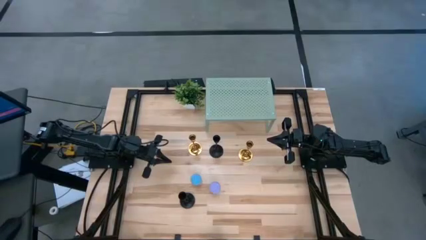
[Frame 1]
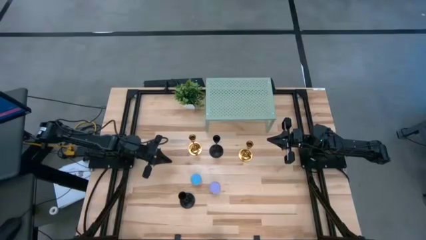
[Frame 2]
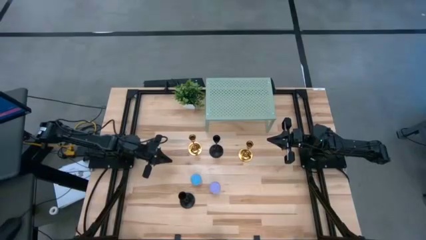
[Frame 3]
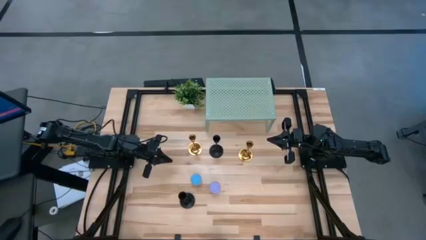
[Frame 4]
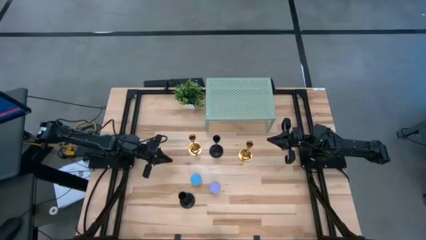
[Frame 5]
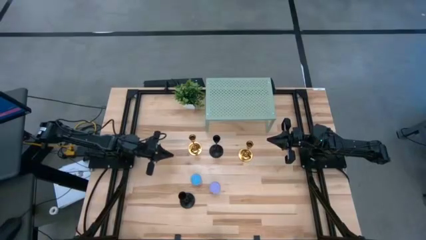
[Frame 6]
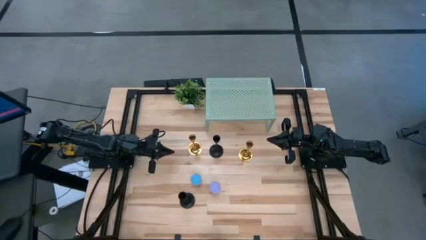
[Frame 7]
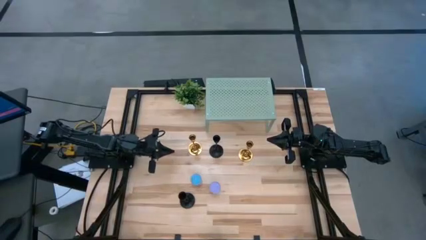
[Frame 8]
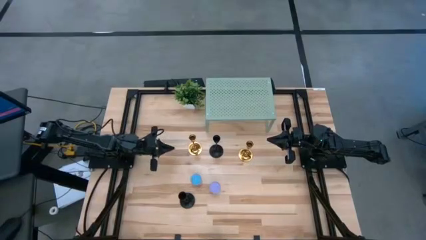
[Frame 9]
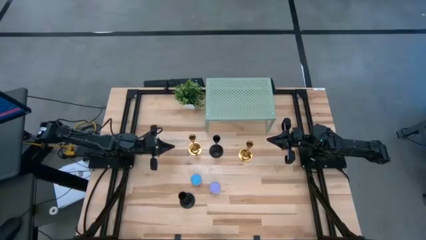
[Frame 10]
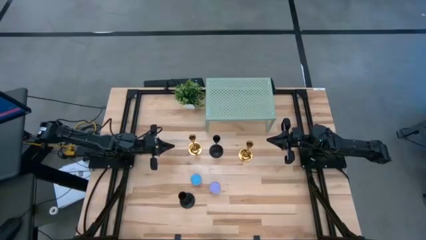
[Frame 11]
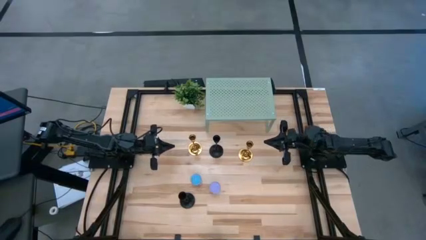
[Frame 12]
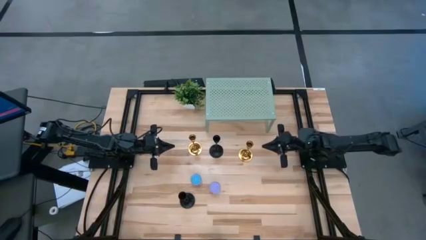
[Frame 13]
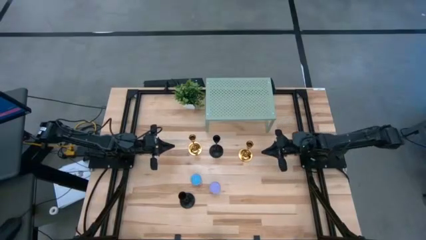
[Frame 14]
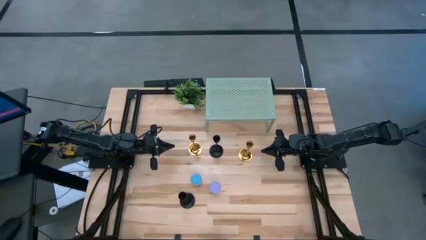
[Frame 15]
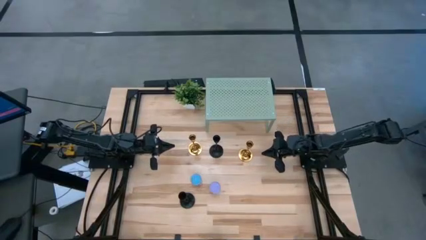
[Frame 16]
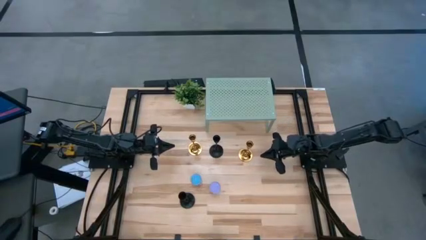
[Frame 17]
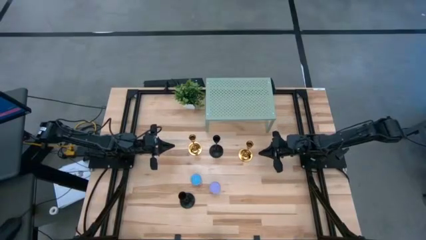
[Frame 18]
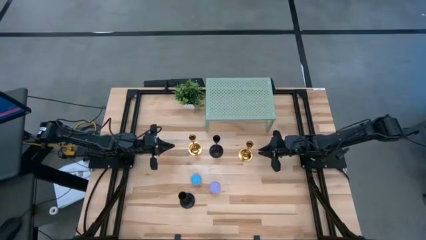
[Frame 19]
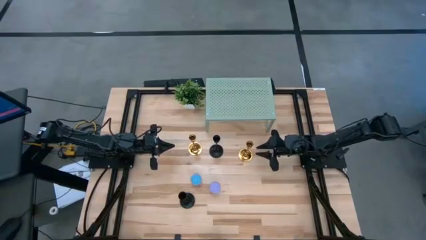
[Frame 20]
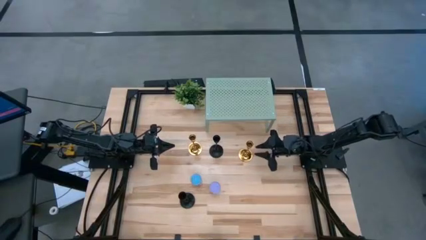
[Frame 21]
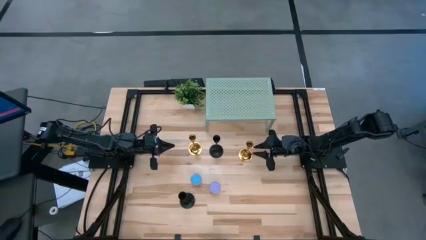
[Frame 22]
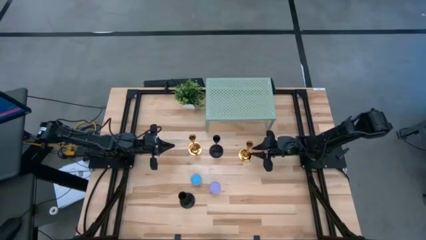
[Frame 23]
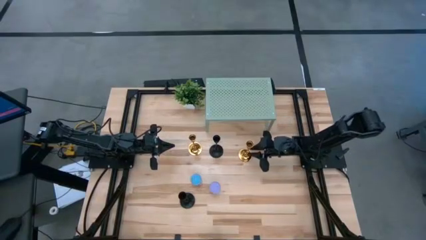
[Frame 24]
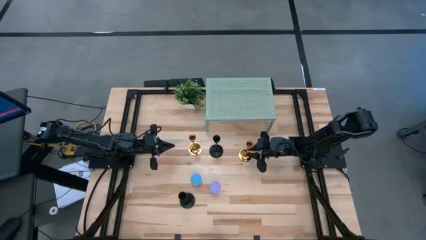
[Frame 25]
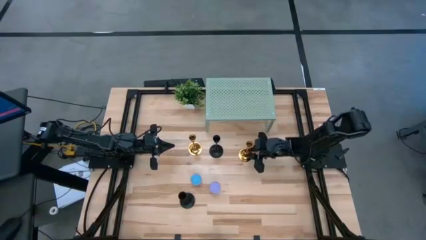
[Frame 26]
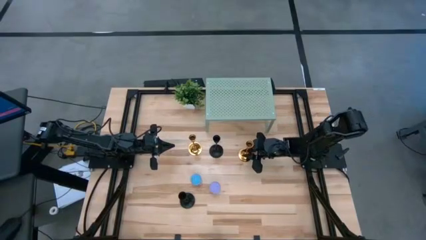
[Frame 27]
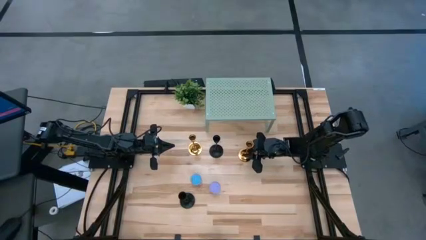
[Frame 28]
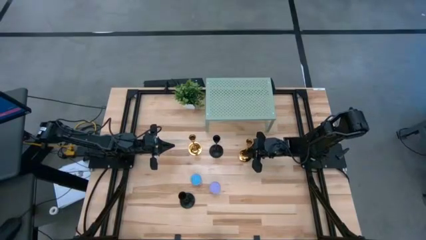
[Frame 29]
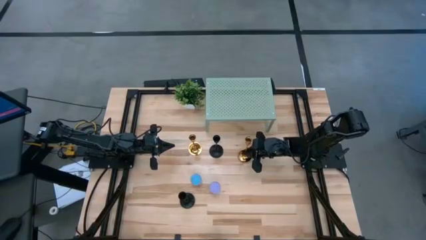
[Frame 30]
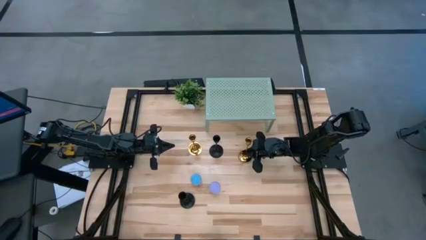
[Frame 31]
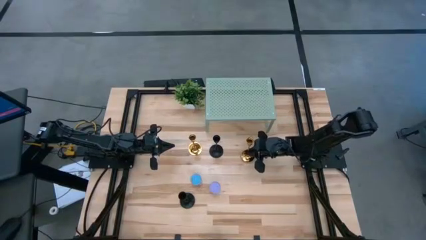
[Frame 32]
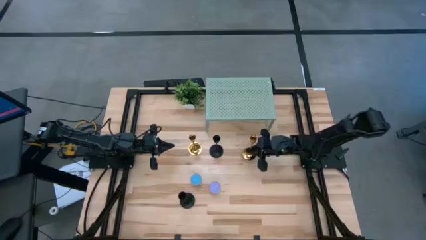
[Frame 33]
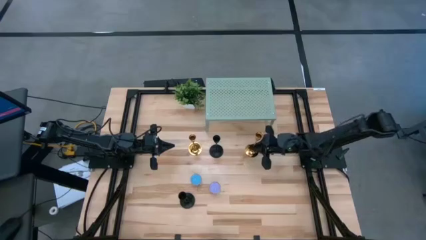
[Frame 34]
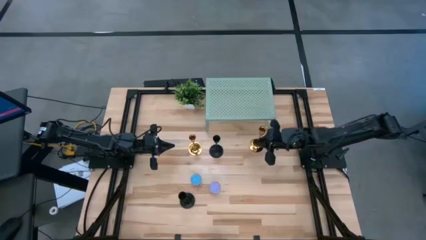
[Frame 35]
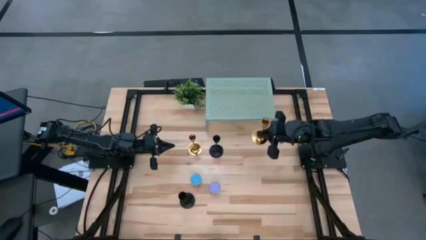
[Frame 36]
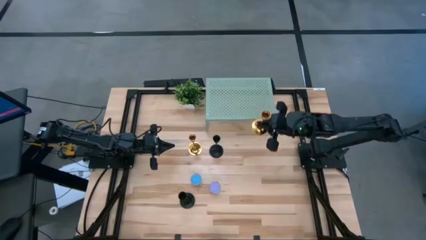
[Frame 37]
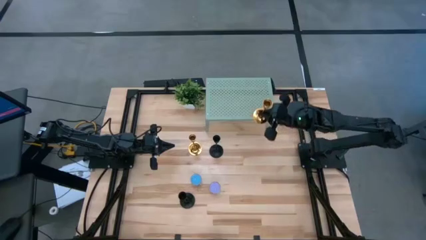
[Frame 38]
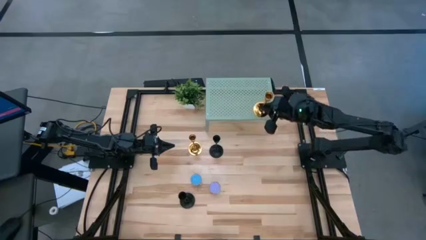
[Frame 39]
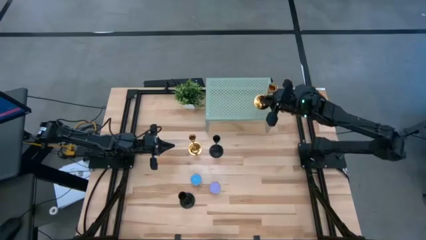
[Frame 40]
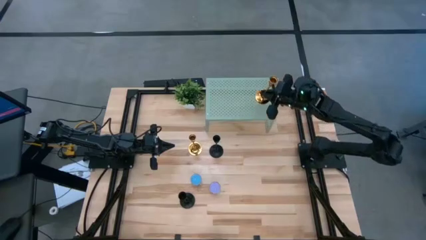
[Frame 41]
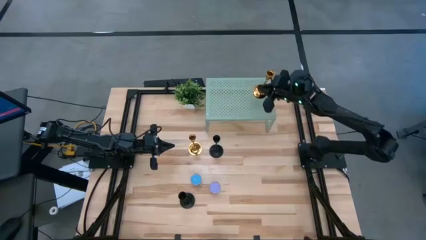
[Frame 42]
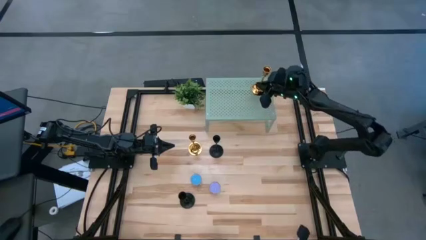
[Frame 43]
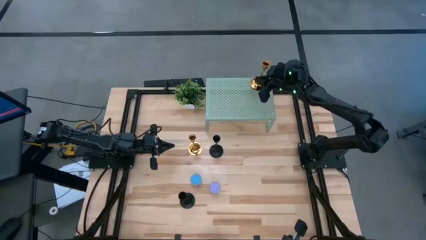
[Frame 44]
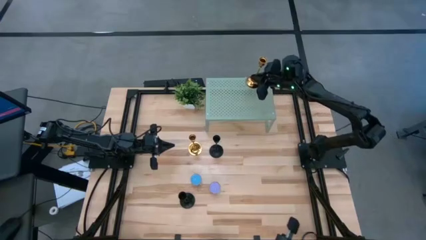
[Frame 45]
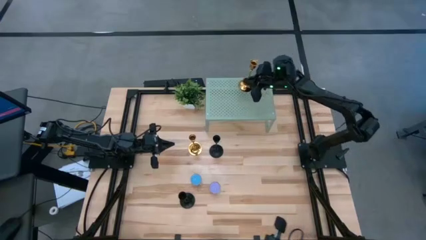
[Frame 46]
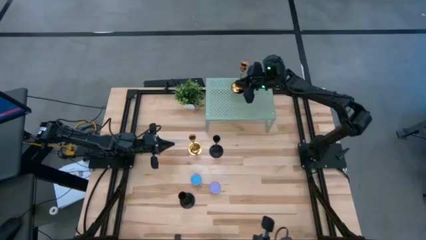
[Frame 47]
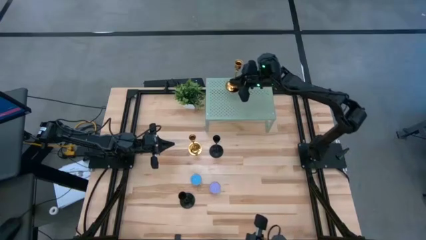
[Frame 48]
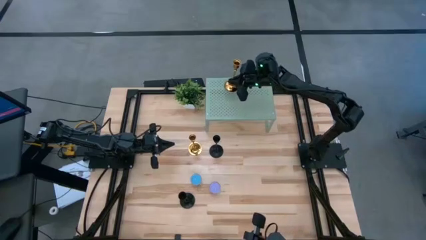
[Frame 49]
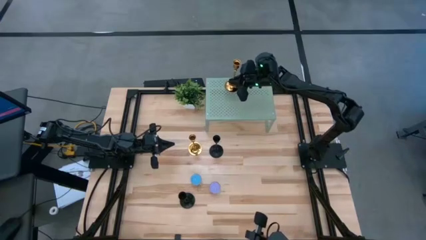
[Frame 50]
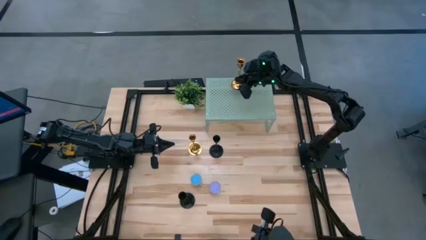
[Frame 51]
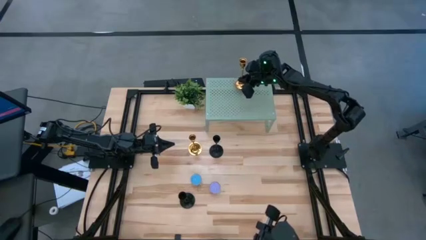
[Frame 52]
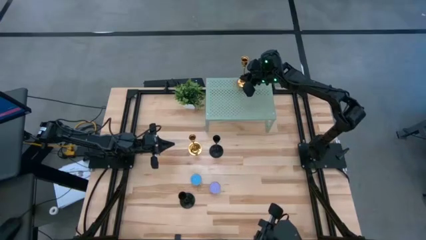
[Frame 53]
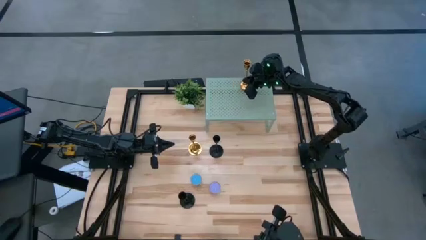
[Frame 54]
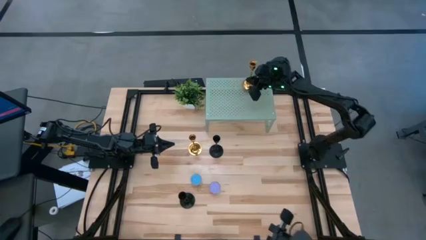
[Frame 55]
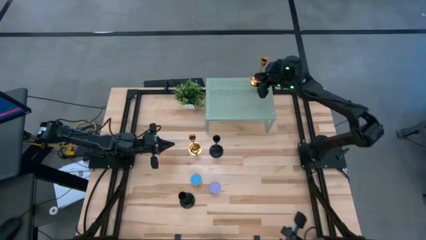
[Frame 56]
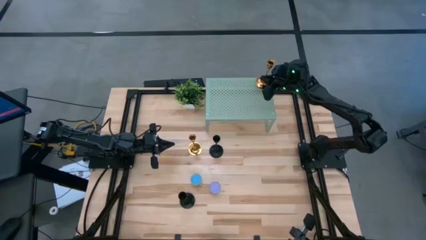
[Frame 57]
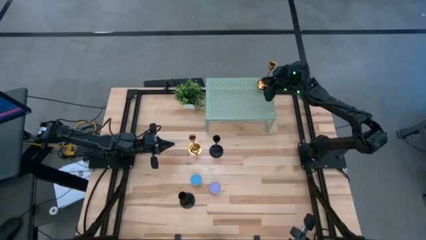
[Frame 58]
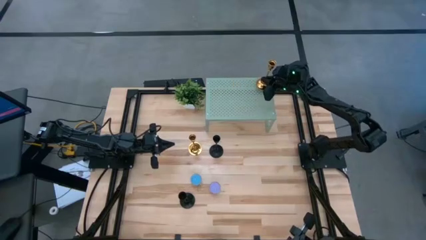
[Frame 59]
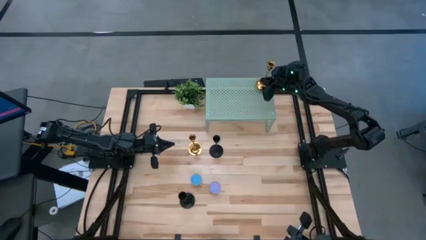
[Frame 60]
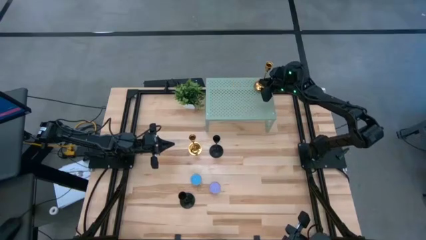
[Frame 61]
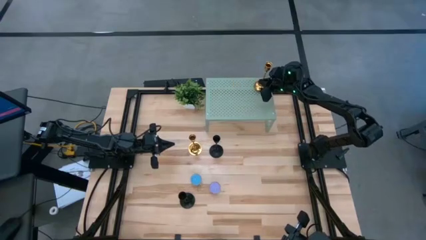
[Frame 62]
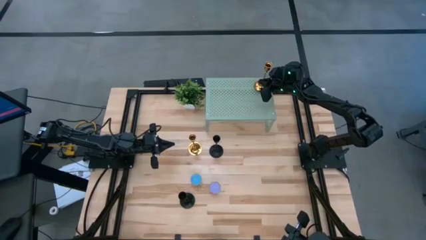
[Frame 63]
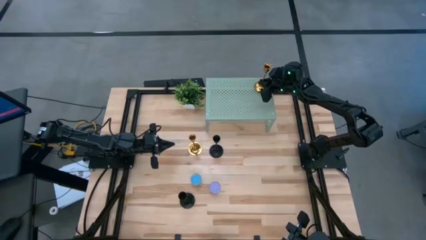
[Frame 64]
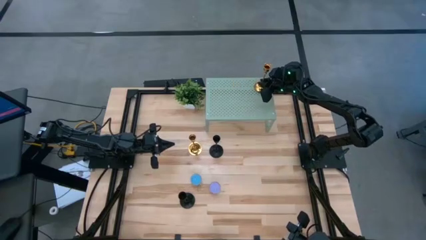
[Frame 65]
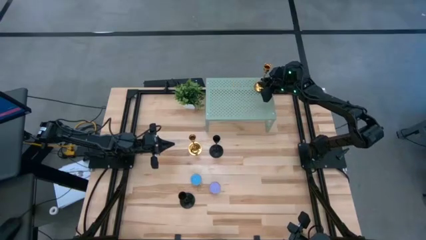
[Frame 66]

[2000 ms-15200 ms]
Task: Pick & Place candle stick holders
Put the right golden candle holder on the shelf
